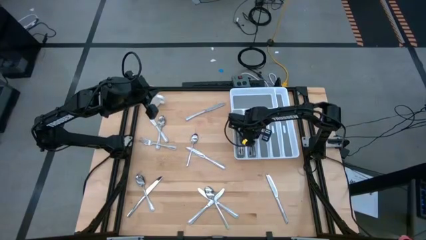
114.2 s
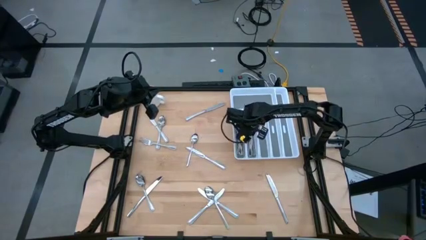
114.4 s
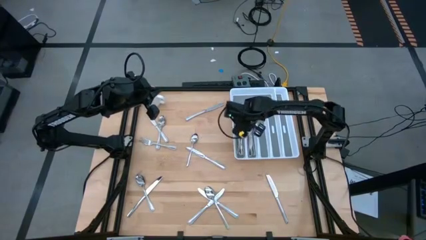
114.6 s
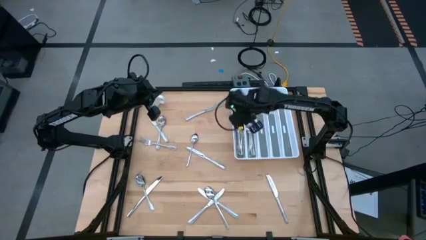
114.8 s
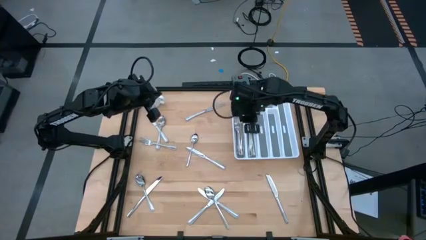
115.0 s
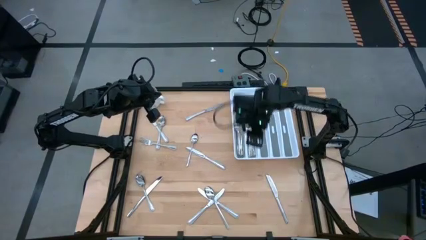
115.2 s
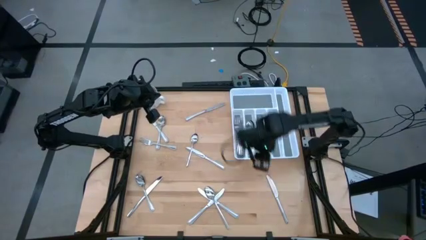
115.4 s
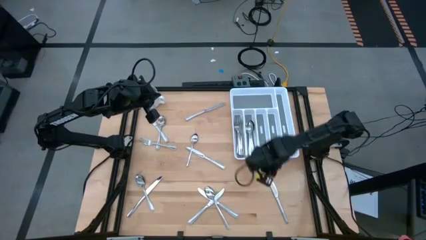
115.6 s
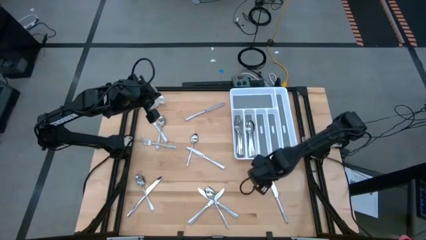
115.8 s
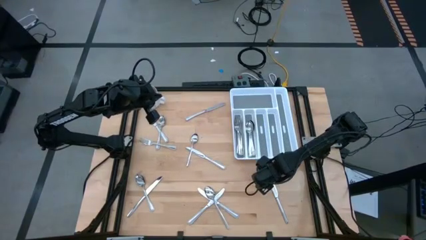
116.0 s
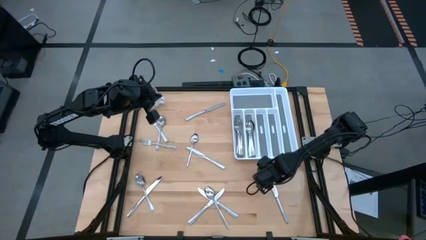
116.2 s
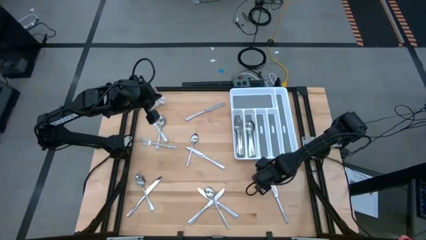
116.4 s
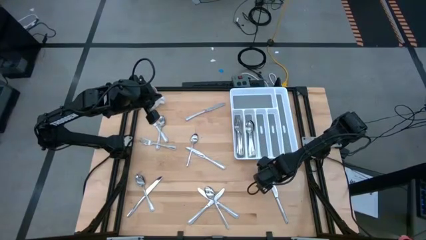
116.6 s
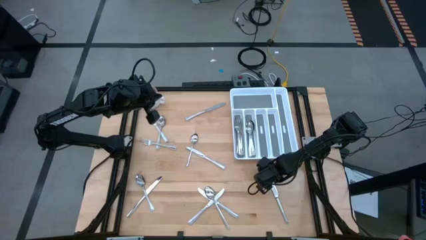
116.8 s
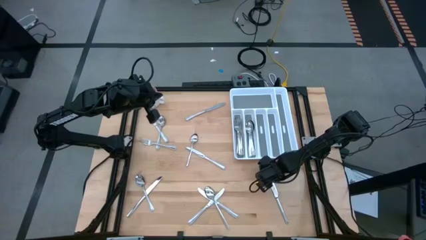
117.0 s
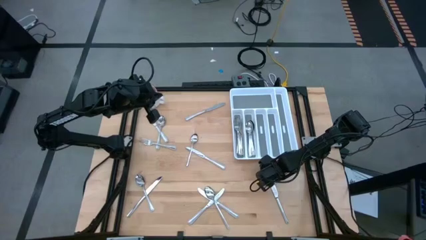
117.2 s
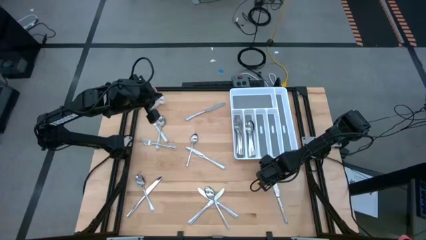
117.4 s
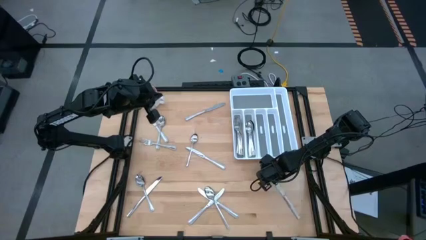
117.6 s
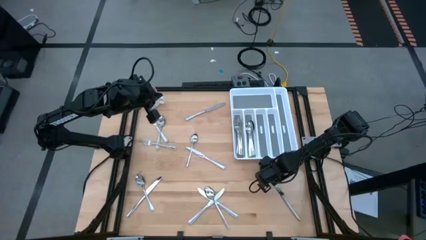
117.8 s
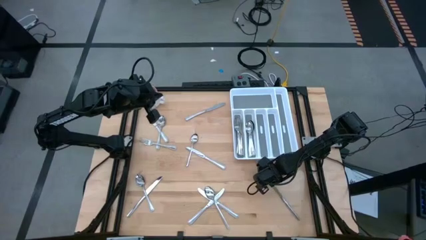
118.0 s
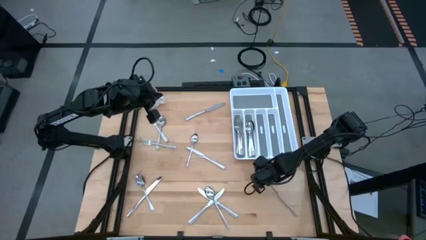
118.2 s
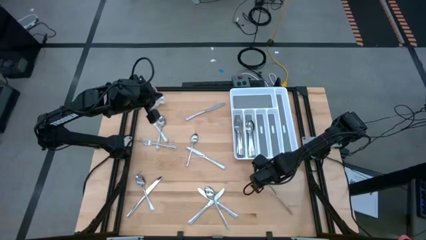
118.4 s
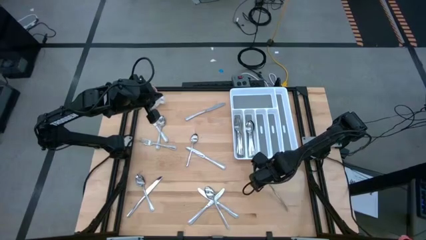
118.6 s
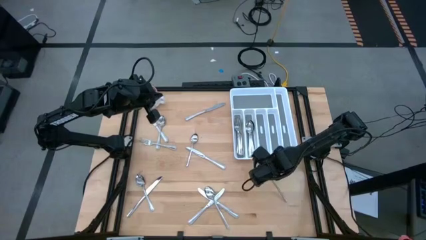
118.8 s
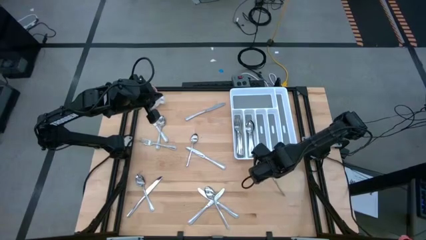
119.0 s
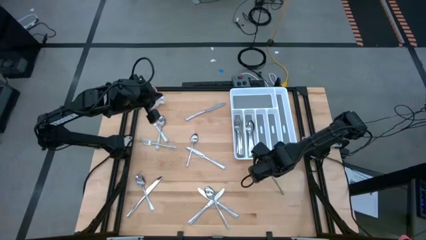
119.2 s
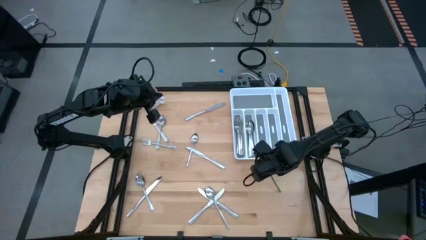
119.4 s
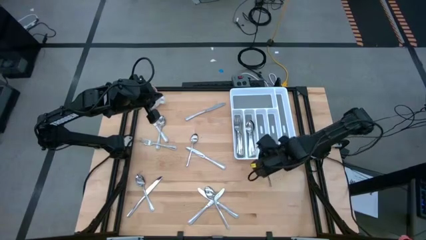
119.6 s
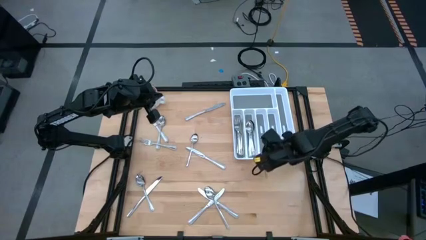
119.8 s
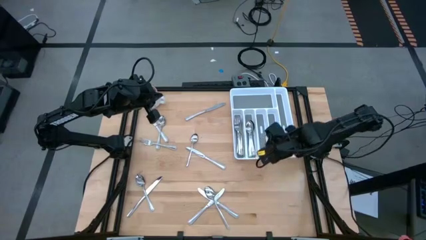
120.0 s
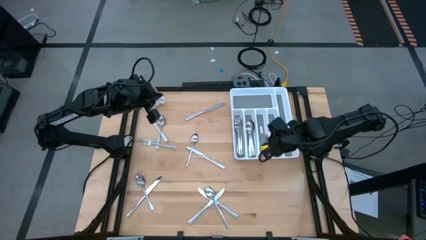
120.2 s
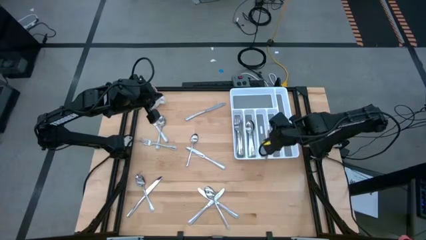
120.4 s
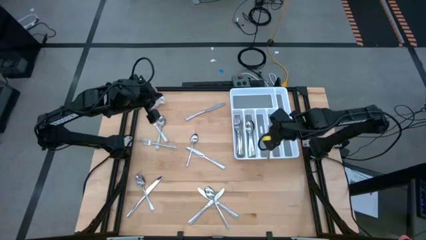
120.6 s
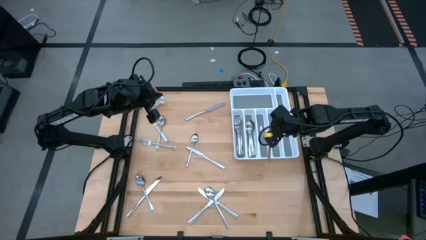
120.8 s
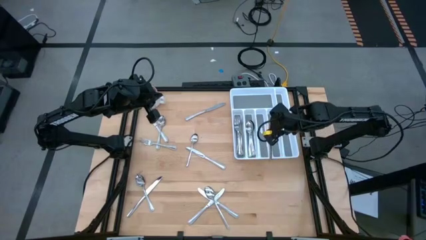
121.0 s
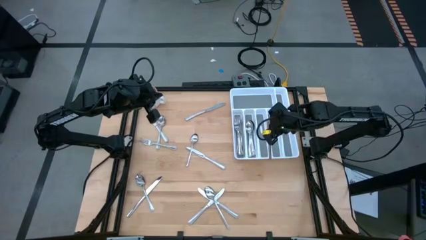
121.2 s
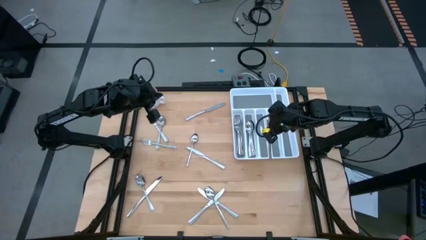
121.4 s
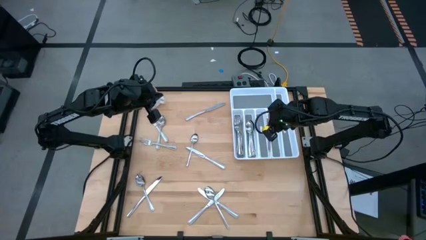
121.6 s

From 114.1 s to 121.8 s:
Task: Sort silverware
Put the silver table knife into the silverware tray

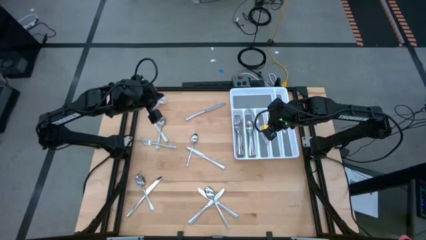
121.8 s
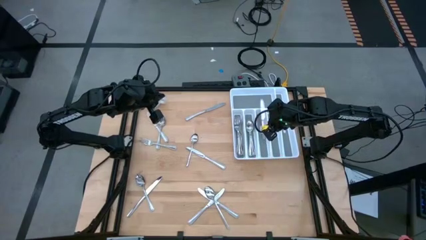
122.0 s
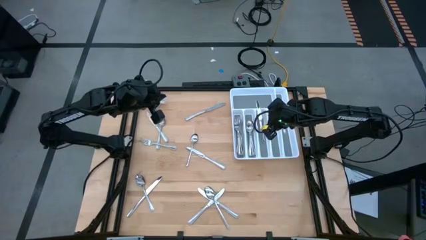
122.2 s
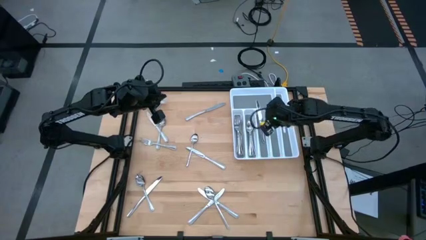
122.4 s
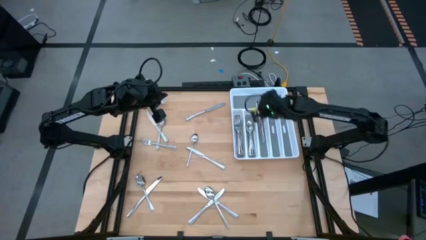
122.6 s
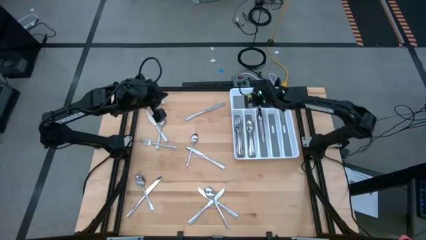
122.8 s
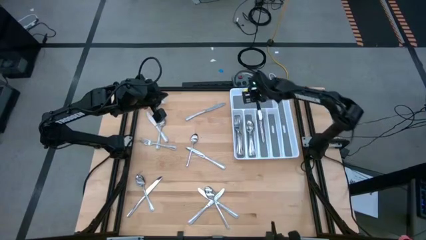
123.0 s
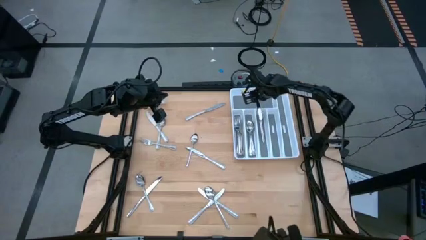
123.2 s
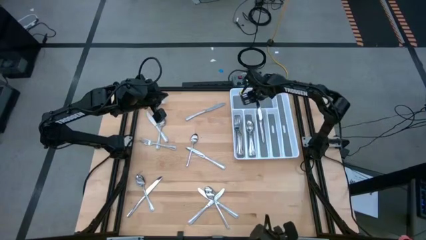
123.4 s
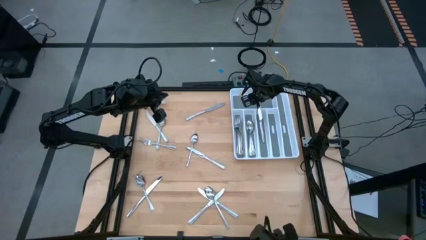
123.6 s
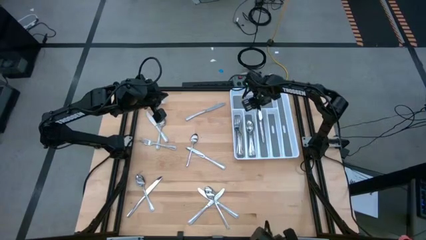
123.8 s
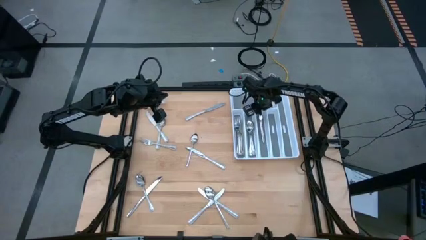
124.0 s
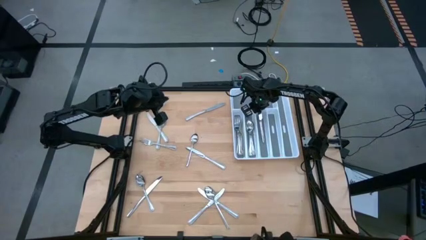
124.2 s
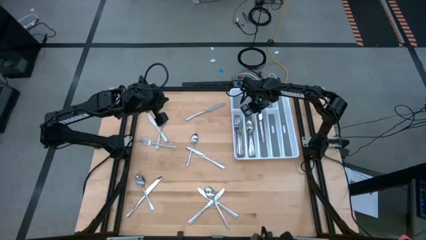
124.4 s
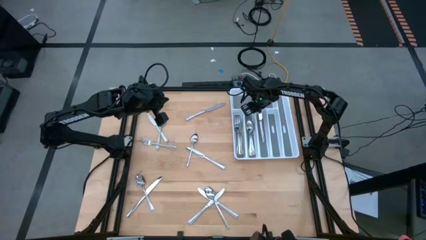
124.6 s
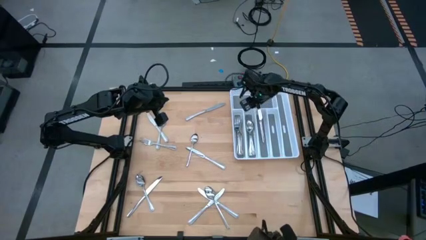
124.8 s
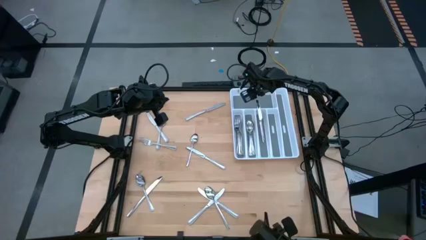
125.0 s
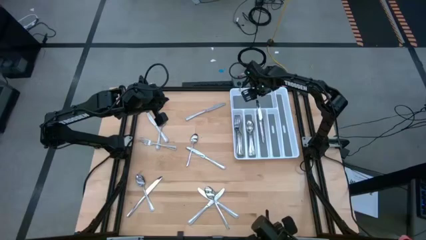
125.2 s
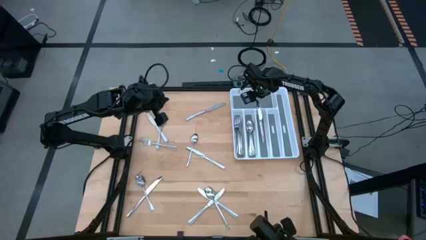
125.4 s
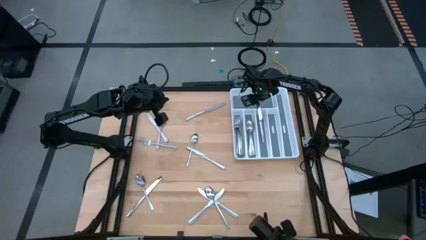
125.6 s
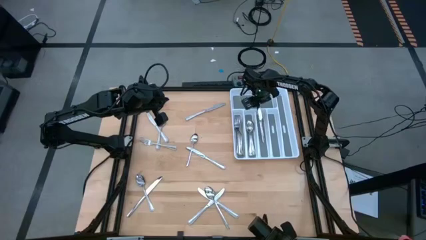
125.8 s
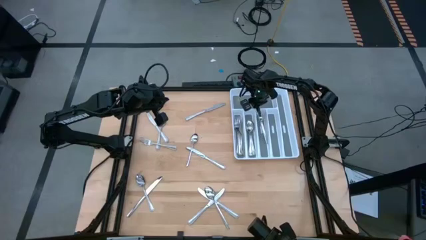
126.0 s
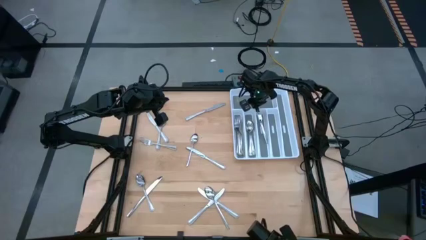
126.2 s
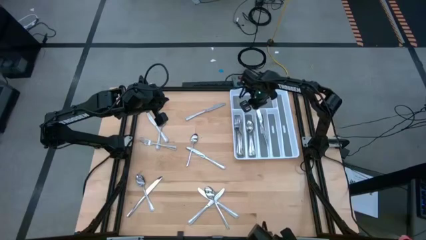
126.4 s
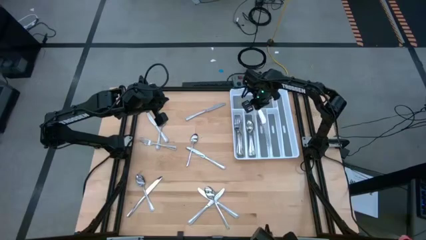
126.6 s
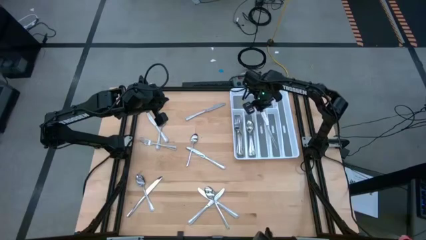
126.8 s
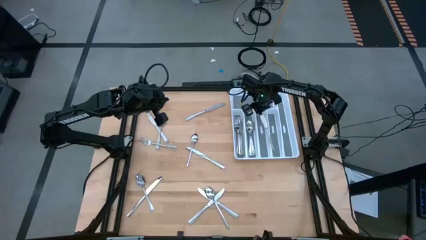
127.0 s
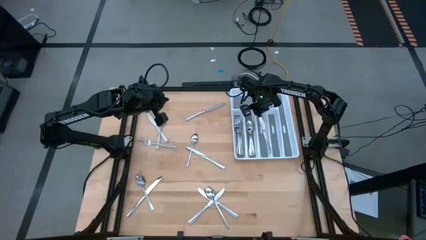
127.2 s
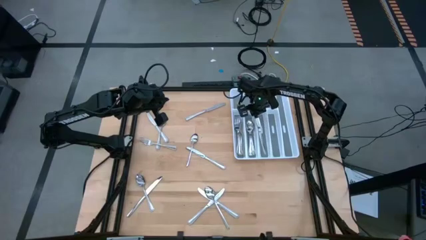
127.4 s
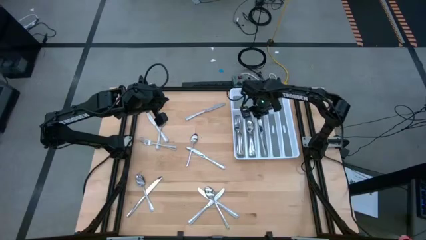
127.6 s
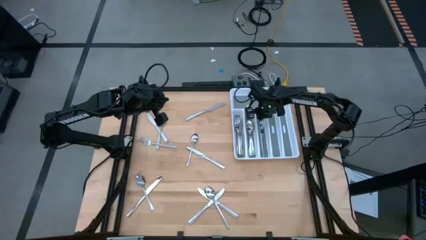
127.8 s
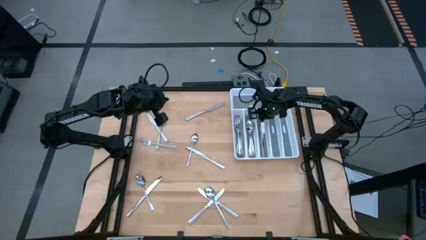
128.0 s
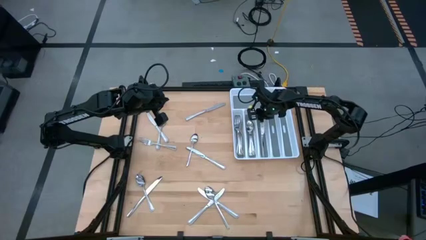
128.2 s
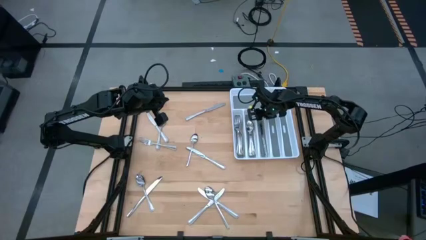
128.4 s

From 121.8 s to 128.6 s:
Put the silver table knife into the silverware tray
